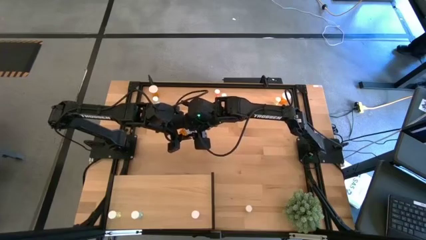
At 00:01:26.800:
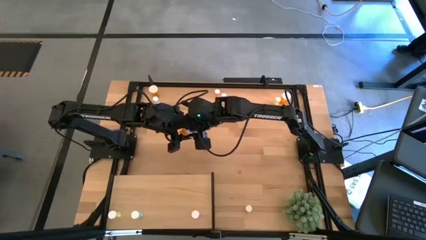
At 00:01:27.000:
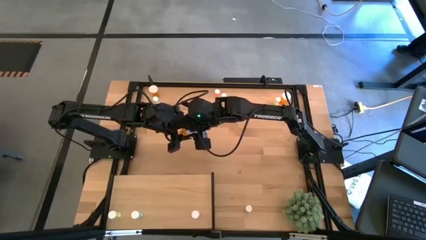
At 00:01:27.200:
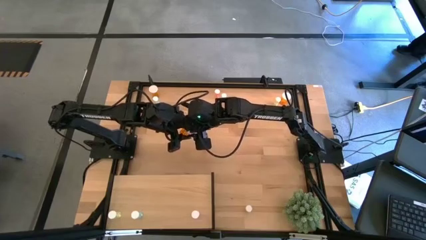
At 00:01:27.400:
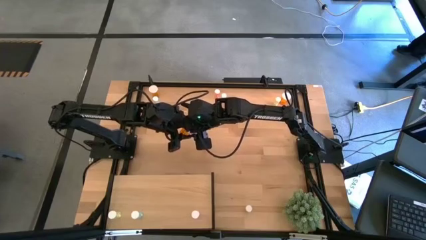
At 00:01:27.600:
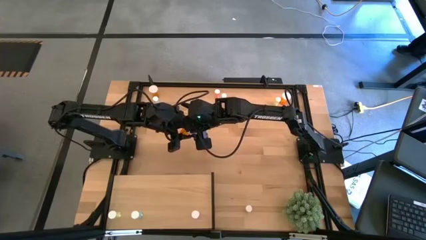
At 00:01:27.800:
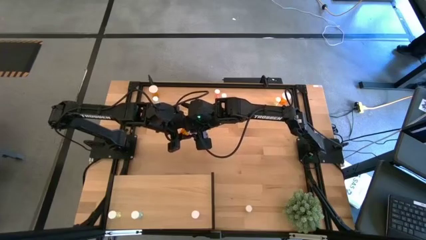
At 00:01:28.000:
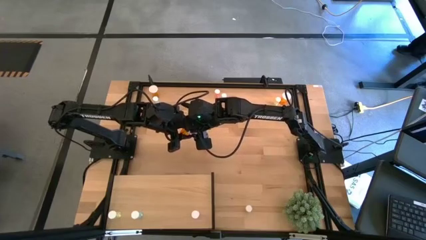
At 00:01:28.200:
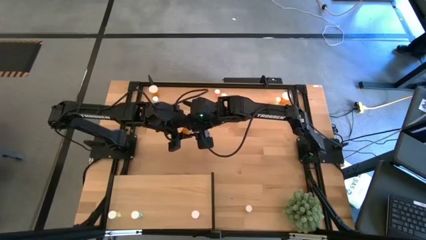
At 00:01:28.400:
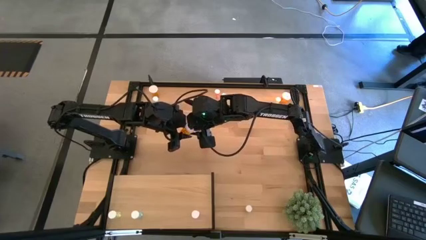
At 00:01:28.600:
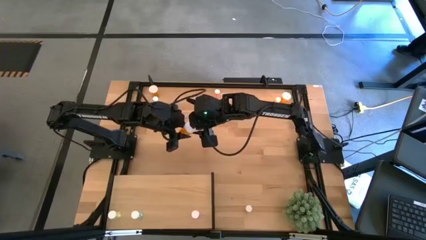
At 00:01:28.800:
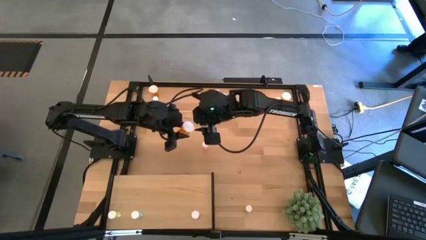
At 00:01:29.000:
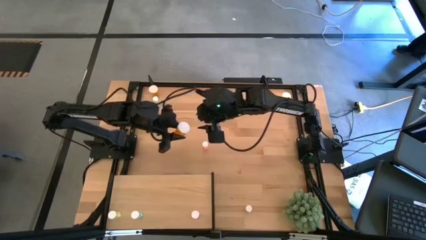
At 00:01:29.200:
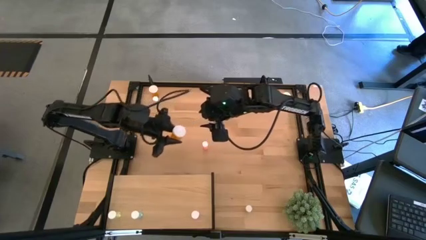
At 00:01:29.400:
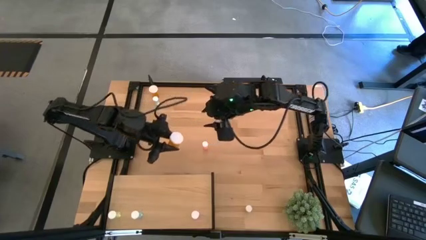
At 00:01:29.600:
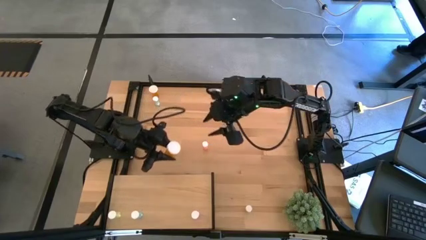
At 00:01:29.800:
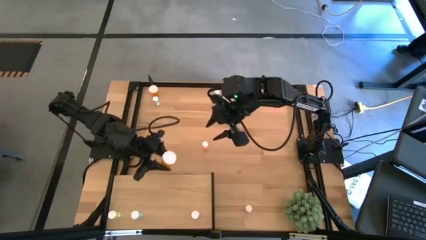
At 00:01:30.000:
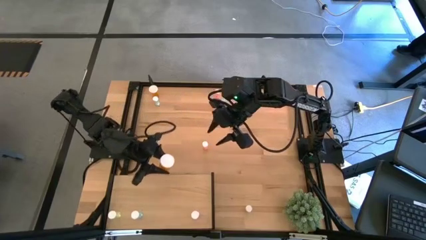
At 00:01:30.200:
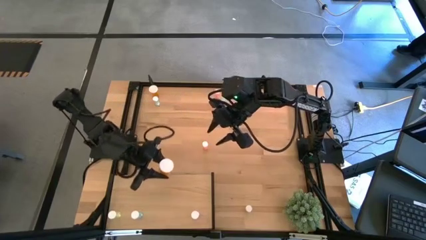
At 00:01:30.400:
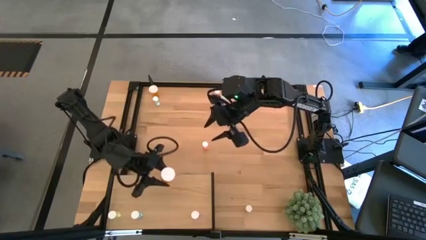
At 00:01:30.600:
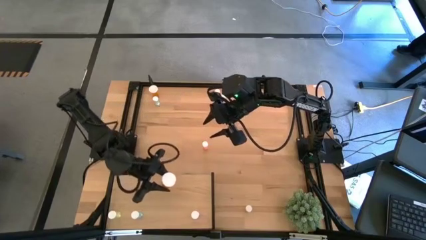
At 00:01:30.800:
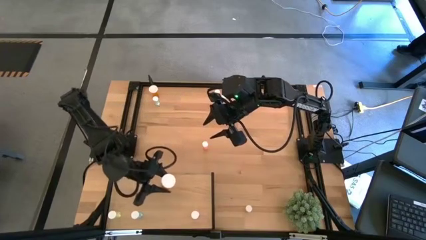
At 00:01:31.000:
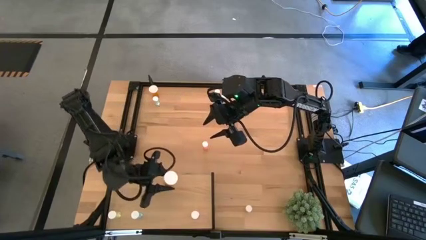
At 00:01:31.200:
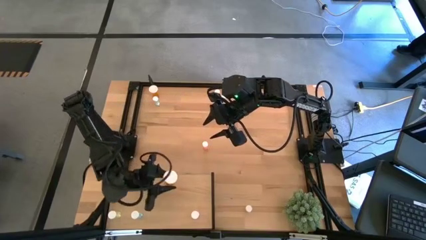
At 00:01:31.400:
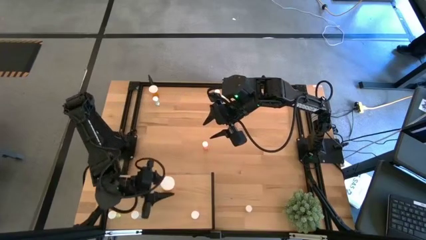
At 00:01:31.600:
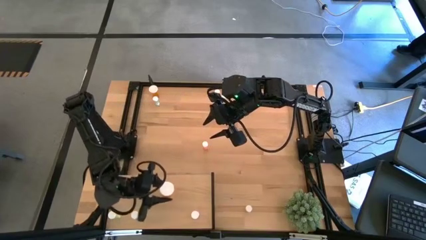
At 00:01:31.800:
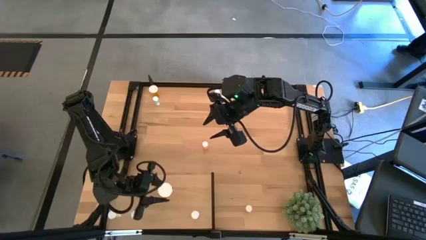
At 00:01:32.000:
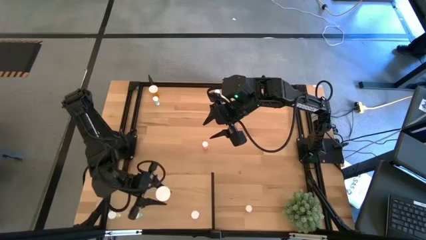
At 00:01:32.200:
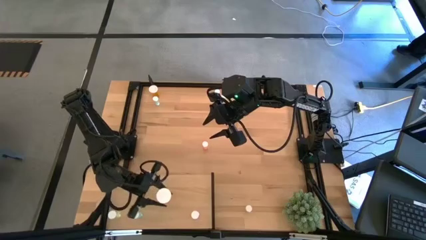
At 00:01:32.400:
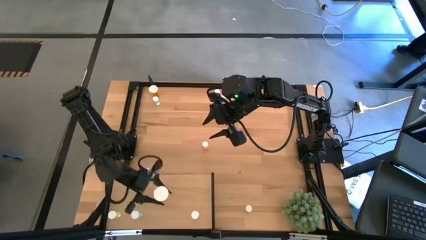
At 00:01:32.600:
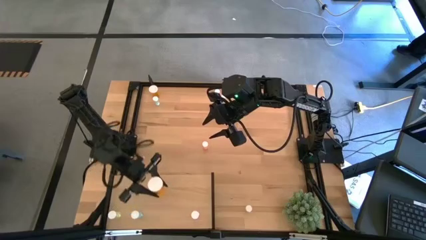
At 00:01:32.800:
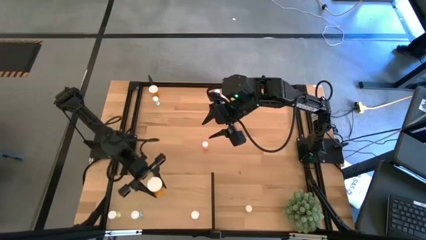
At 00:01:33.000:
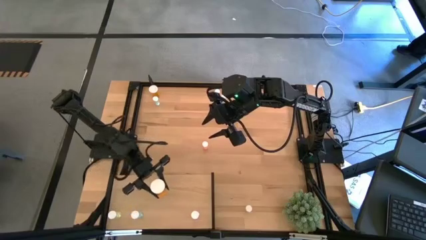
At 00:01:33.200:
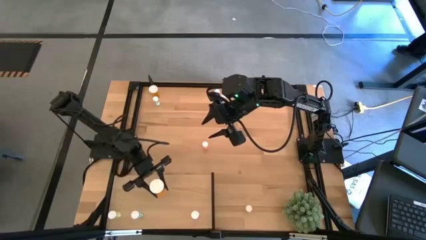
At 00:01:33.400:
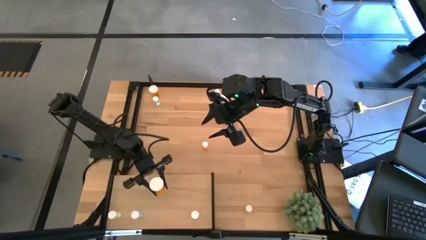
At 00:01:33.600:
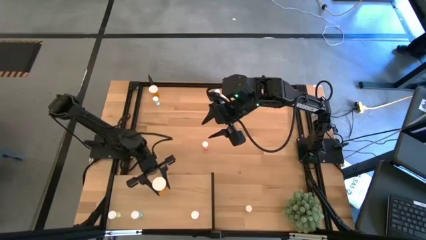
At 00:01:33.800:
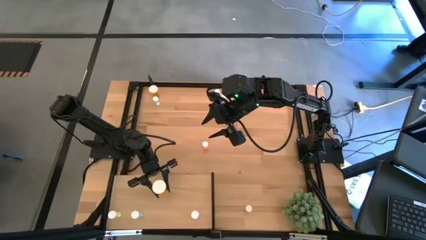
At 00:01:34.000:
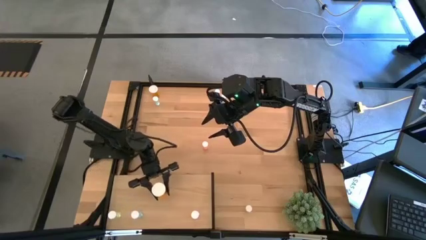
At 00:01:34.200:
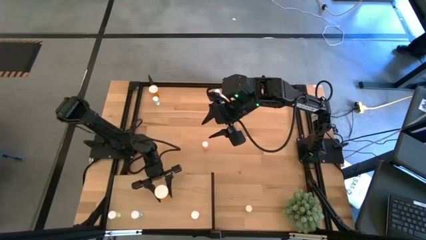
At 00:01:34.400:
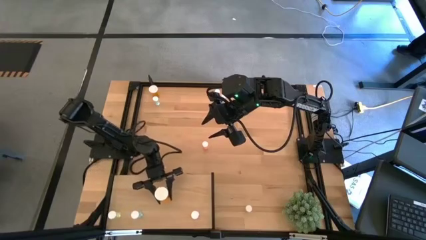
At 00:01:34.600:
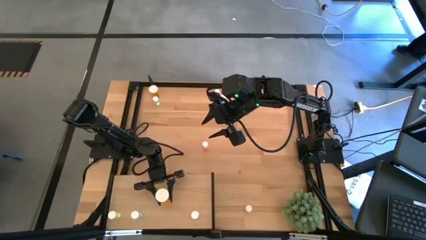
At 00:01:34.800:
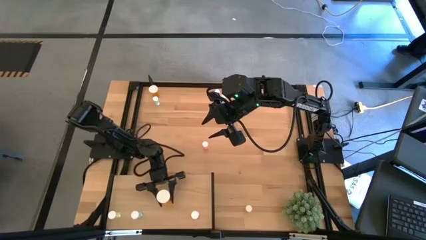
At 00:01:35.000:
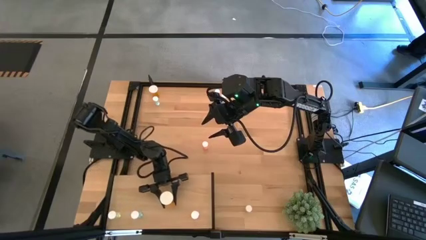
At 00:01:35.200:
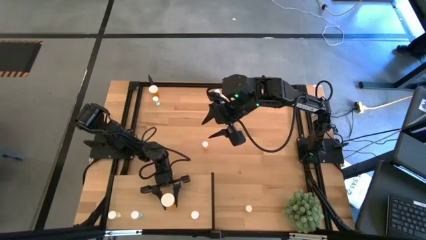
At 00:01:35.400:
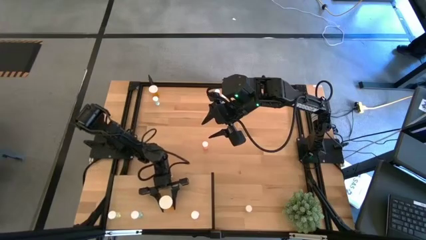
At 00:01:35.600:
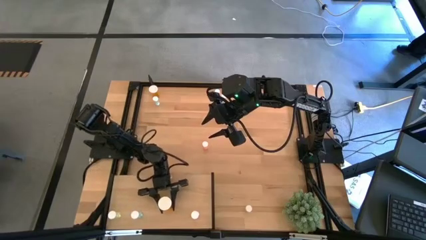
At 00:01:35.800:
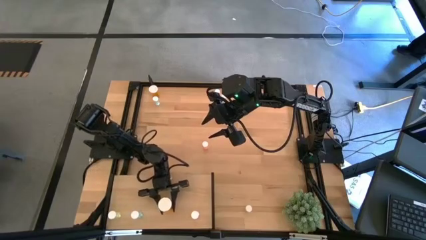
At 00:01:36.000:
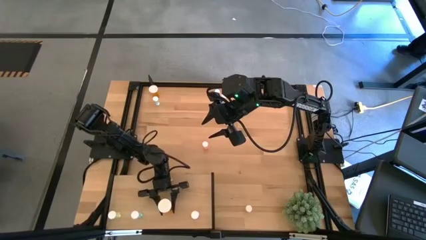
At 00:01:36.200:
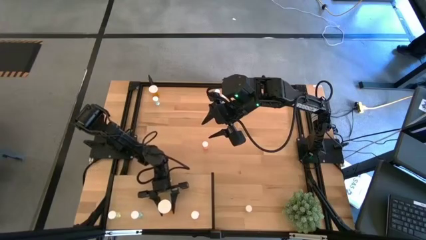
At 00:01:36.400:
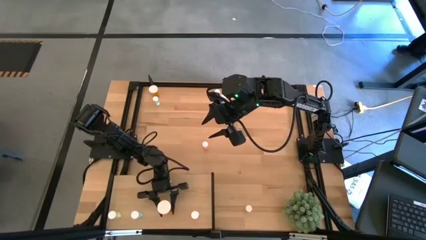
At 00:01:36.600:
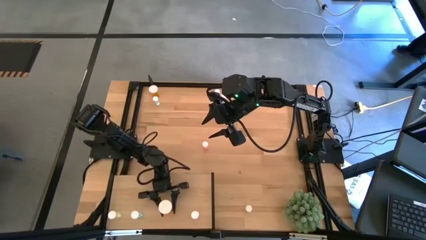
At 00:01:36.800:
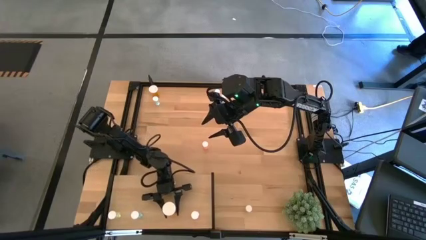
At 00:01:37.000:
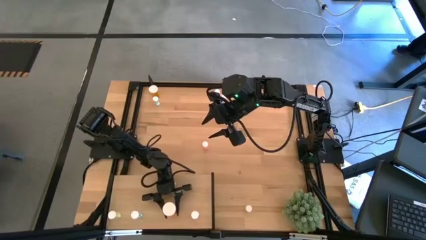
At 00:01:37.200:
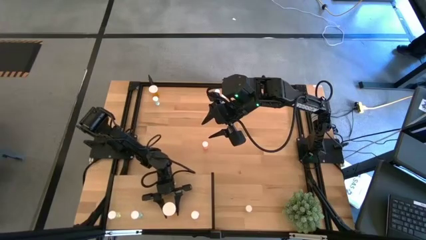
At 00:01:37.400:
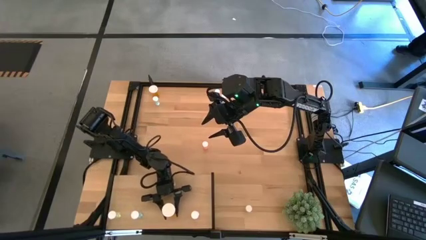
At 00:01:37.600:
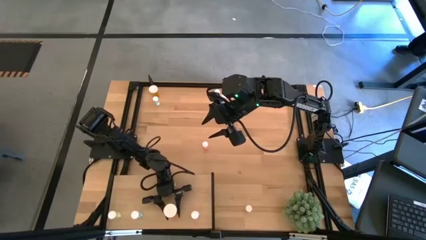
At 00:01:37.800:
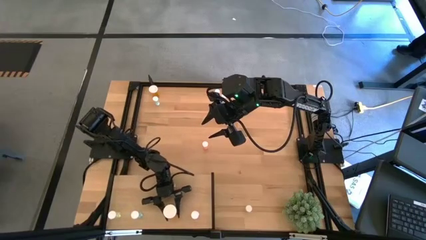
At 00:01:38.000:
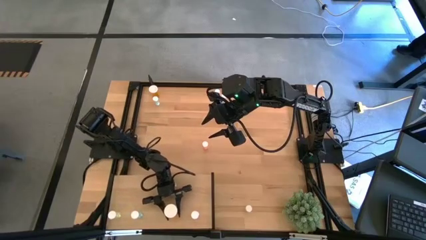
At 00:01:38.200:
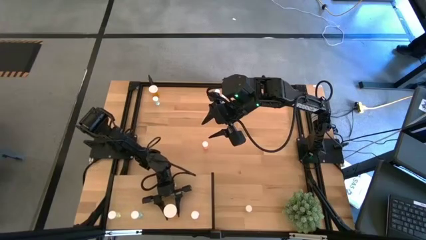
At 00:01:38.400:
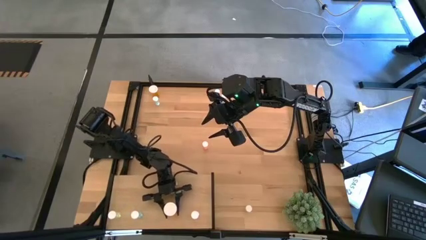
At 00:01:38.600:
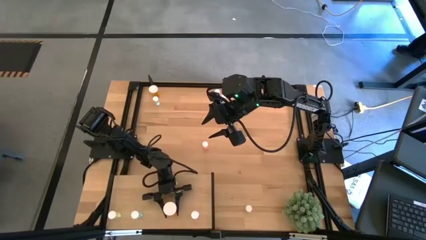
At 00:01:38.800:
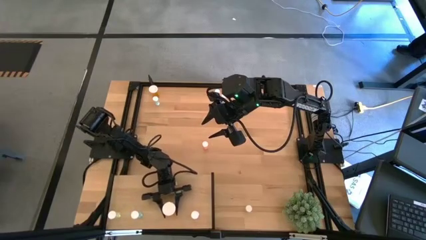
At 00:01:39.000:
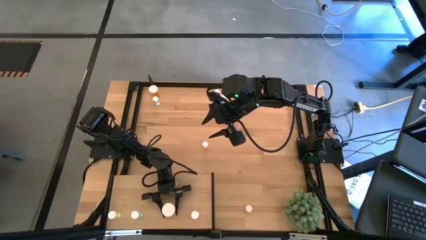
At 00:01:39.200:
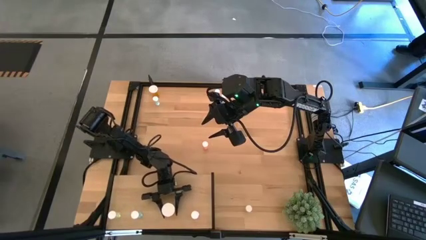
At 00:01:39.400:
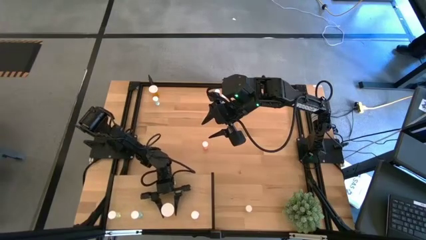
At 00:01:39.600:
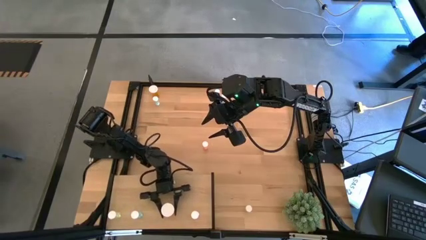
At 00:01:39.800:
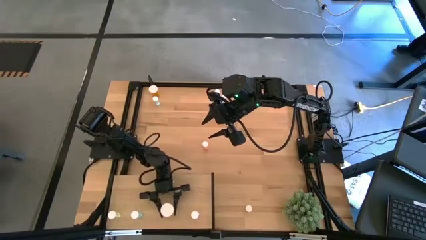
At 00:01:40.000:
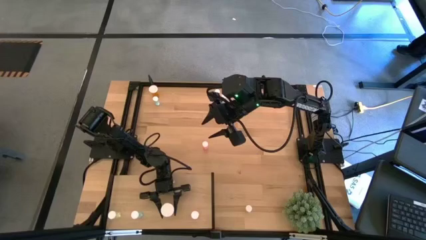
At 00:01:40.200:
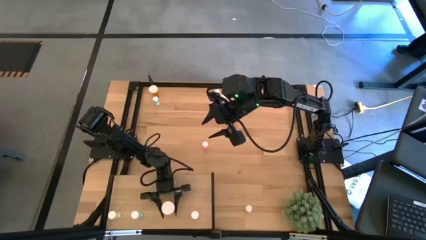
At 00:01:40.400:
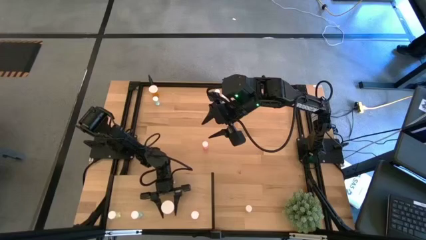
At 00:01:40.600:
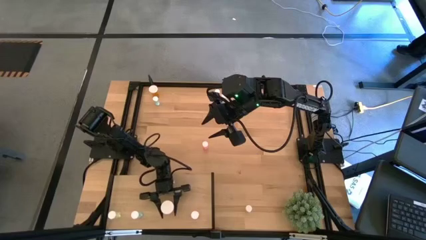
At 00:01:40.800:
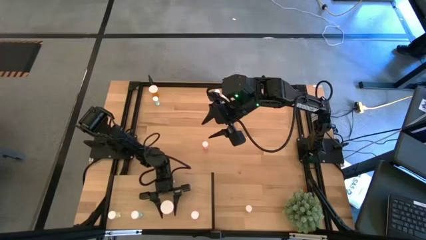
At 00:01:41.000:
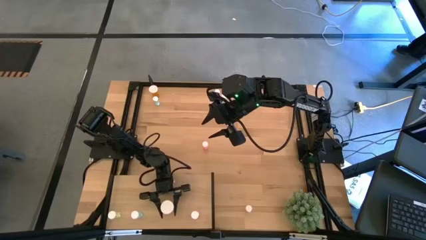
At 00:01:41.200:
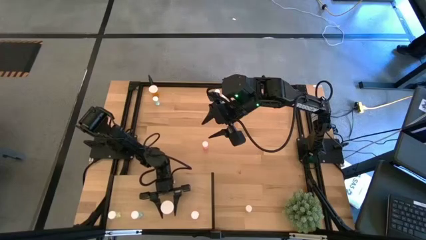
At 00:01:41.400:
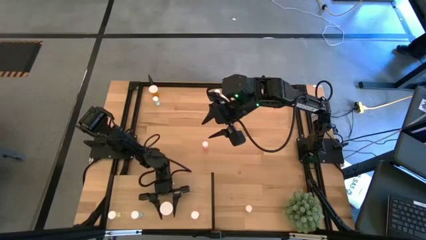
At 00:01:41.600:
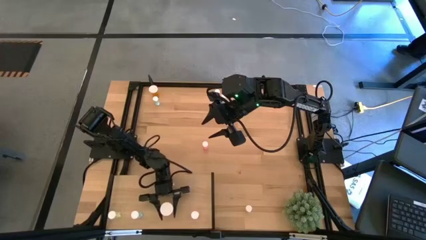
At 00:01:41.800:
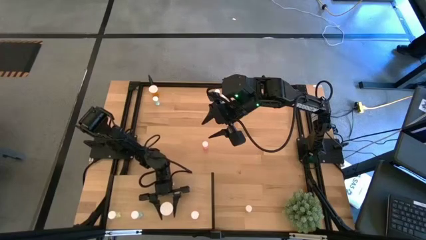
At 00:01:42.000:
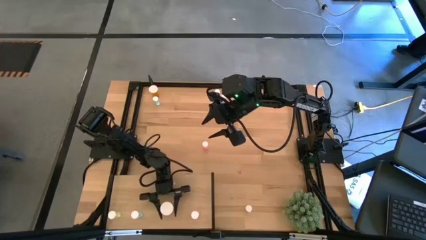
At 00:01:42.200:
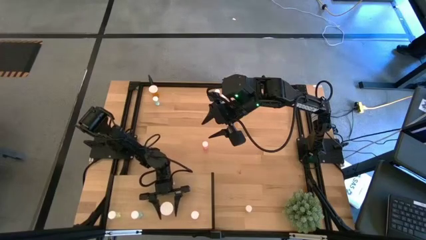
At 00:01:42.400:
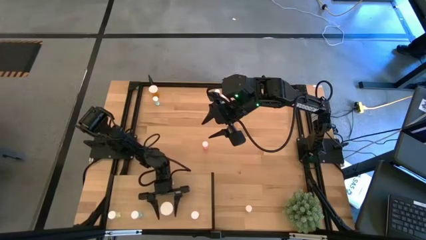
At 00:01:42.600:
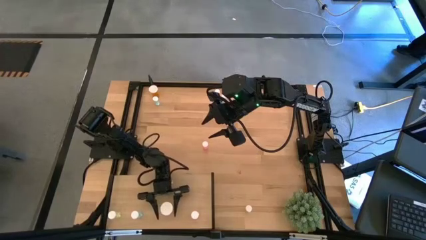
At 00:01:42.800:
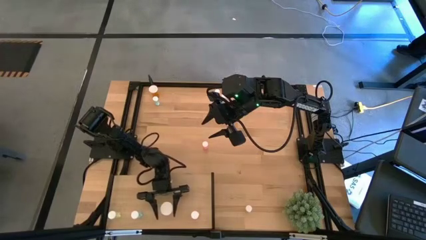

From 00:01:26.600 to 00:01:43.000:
Task: Pick and place medicine bottles onto shelf by color
Put the middle orange pill bottle on the shelf
